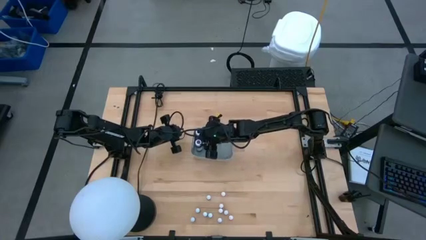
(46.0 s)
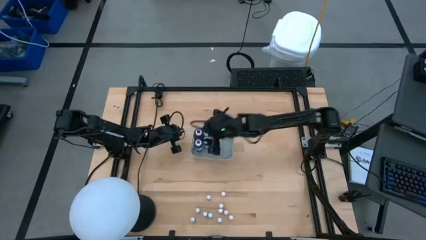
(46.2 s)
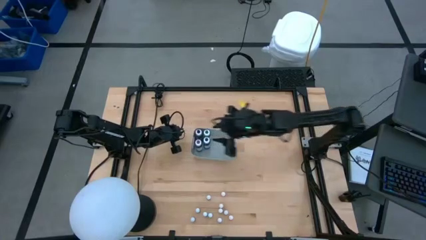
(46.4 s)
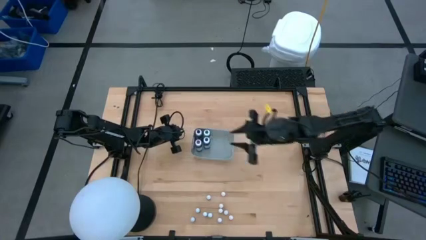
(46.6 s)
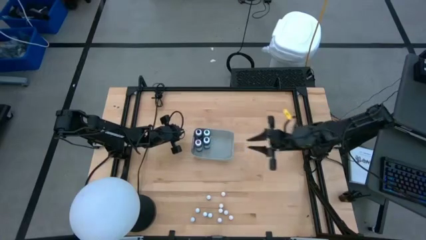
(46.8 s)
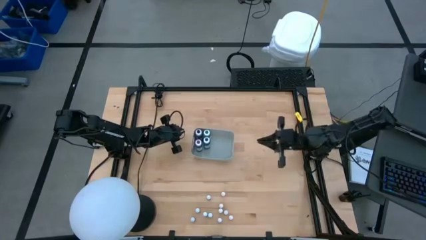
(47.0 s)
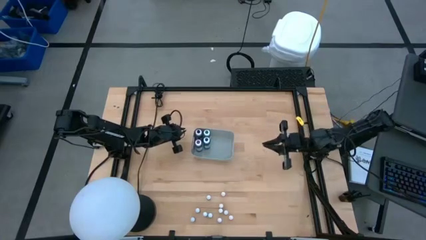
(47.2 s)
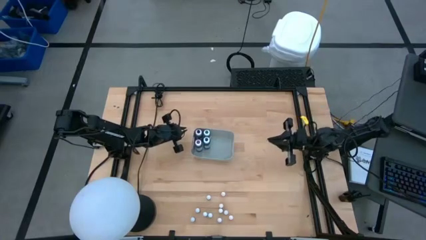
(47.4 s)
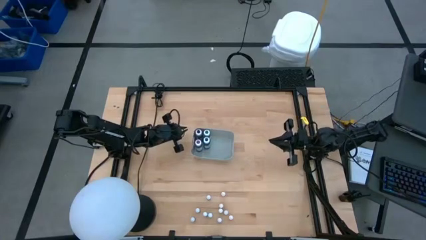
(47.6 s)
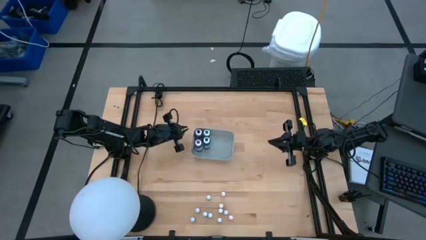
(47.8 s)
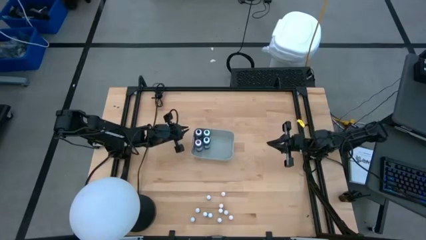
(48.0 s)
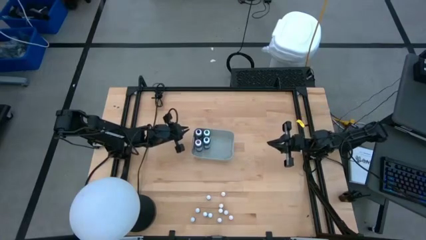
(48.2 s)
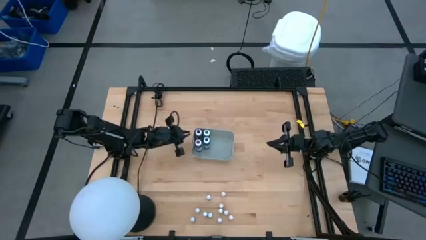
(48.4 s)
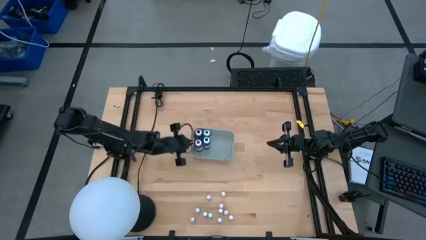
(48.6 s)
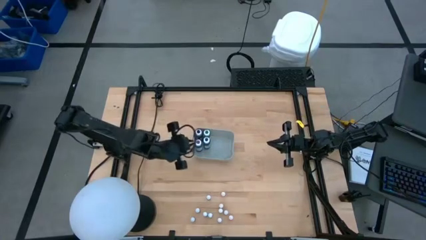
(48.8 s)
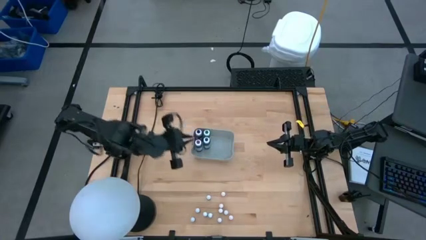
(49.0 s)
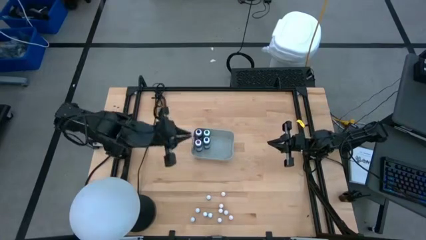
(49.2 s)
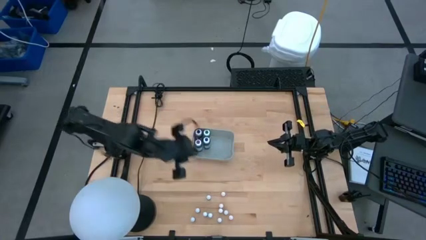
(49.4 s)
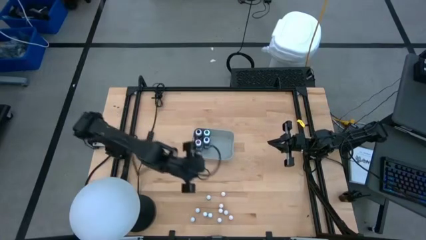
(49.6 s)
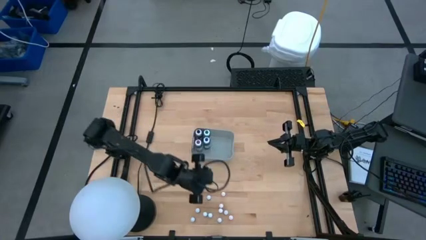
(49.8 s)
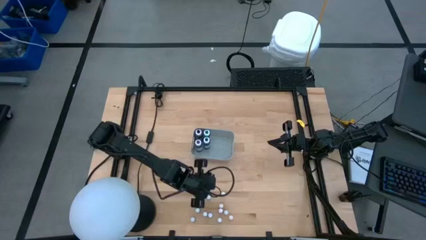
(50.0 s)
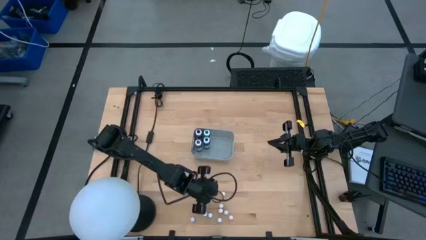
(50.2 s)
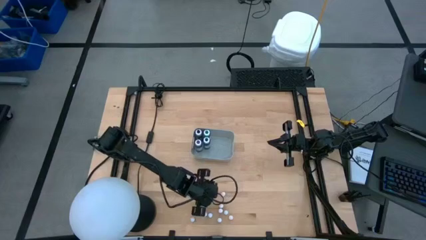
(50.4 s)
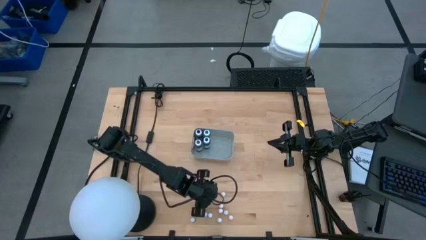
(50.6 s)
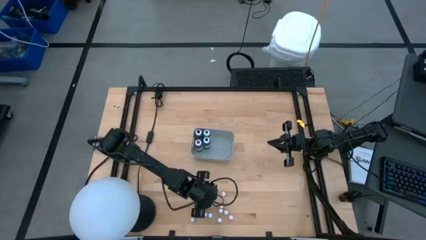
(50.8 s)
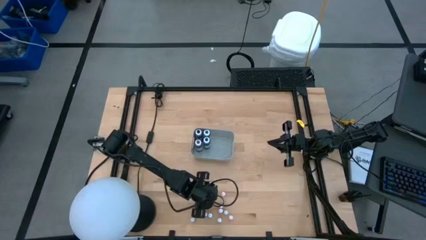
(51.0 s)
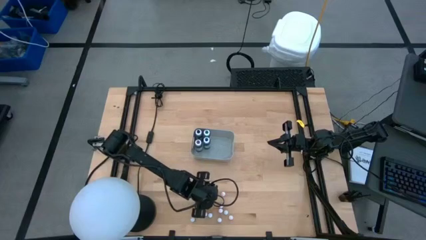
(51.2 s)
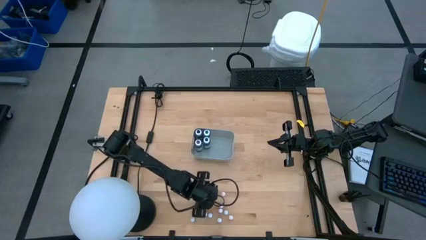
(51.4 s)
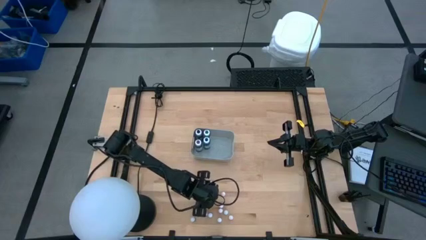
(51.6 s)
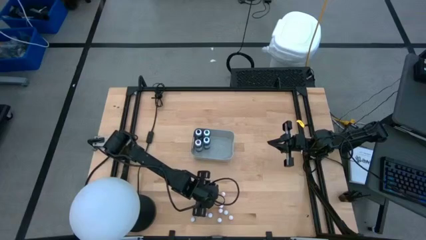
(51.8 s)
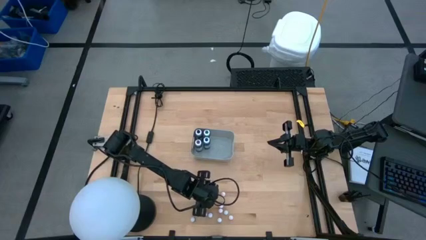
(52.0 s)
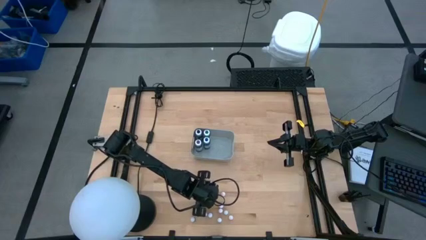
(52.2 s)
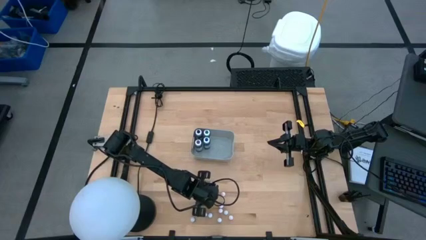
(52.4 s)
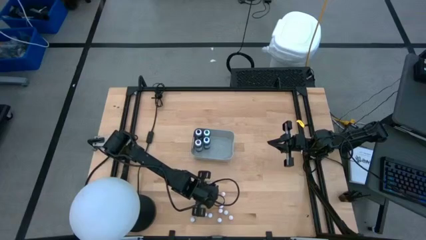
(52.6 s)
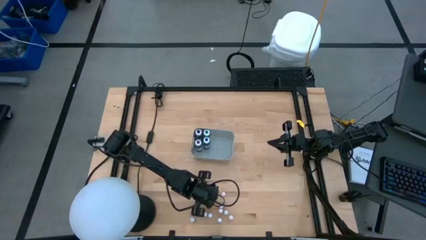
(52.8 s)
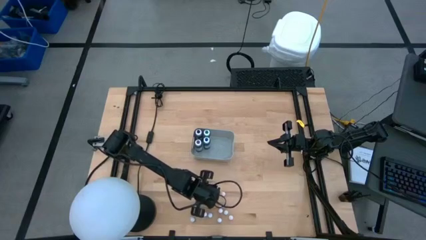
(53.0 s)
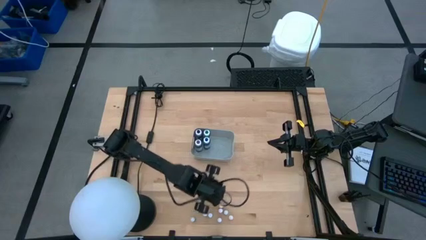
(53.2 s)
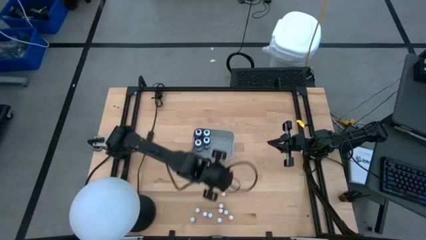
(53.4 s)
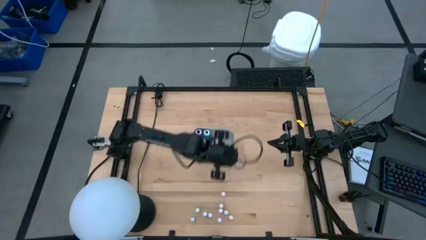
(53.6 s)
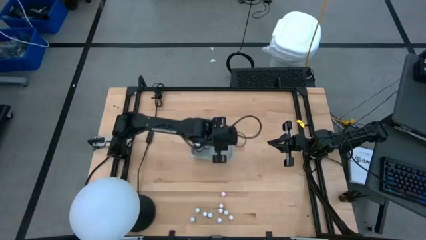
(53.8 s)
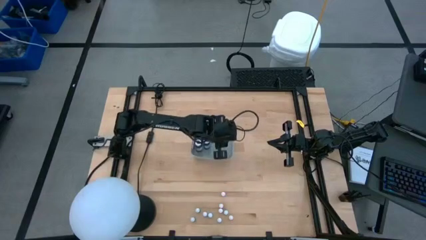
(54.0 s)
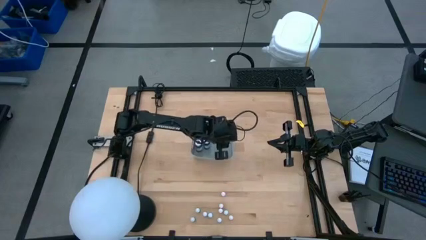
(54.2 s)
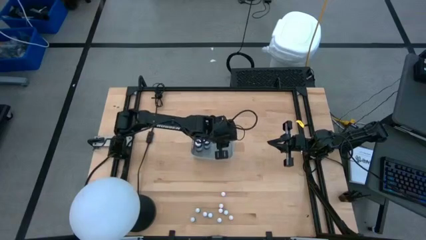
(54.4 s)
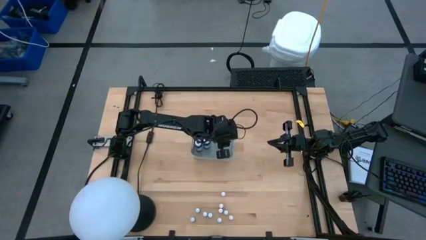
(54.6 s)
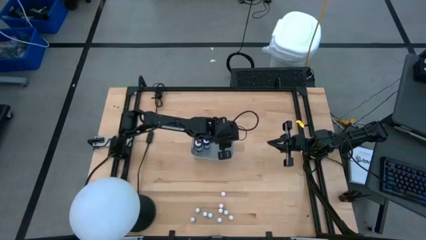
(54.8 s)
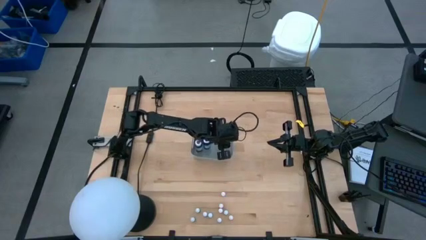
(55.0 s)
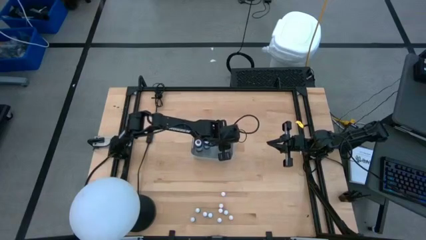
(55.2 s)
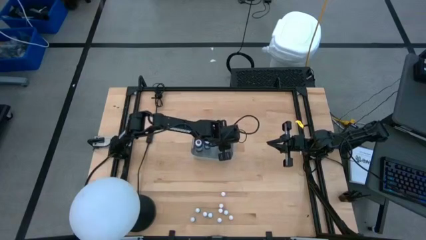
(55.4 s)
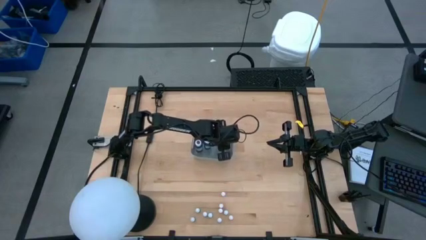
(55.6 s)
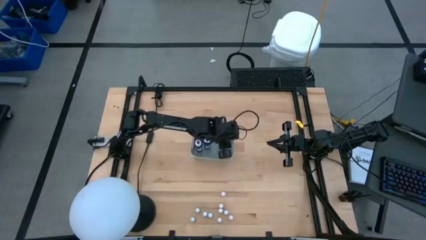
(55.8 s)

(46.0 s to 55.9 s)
Task: Pick & Place food coloring
Put the small violet food coloring bottle into the gray bin

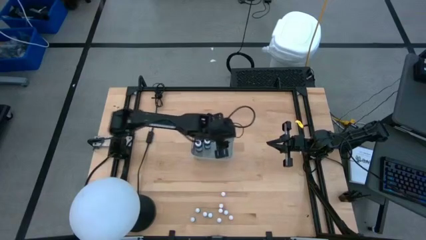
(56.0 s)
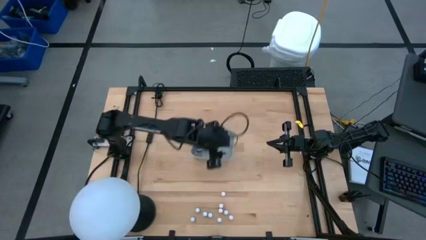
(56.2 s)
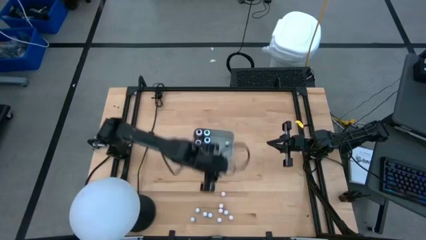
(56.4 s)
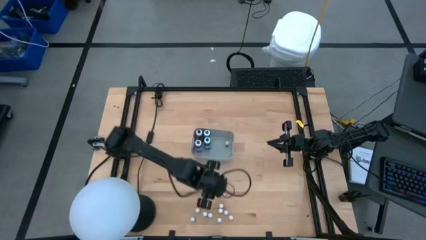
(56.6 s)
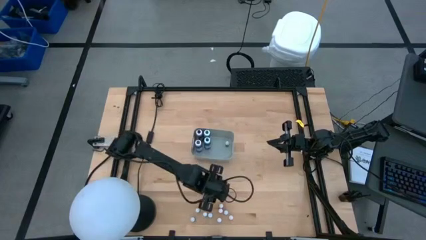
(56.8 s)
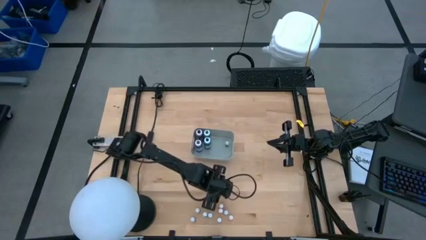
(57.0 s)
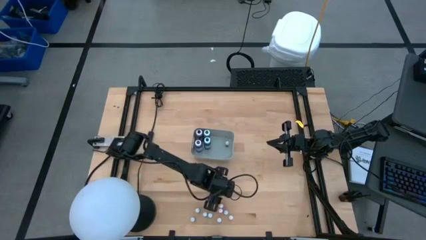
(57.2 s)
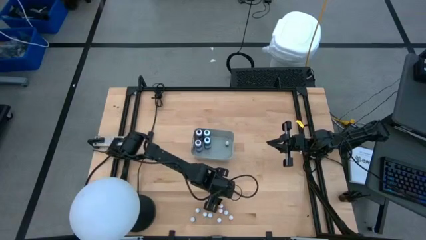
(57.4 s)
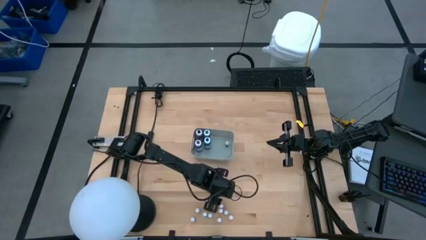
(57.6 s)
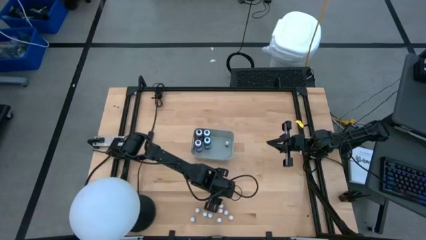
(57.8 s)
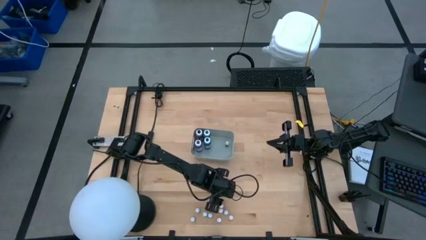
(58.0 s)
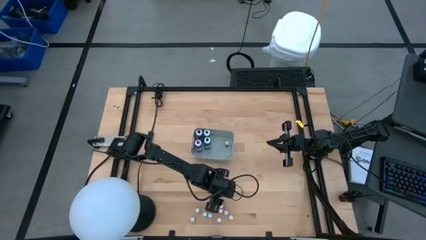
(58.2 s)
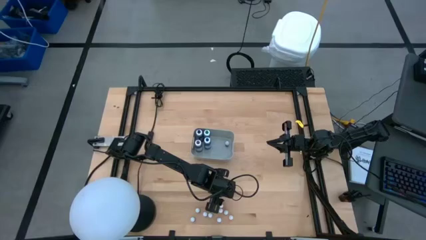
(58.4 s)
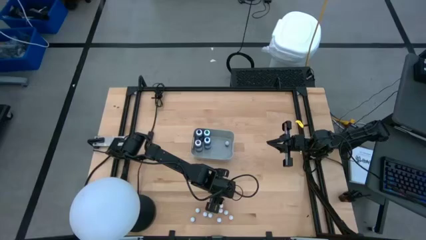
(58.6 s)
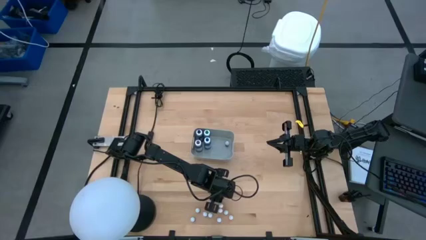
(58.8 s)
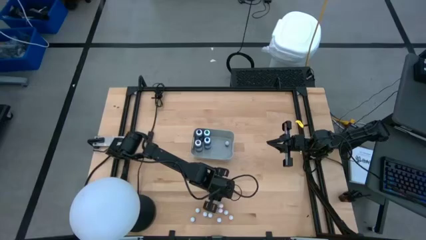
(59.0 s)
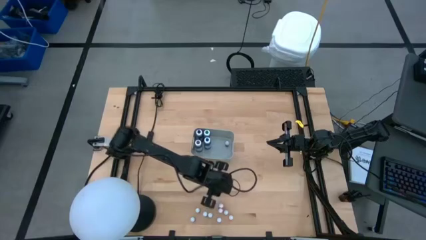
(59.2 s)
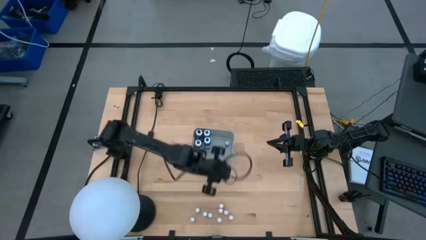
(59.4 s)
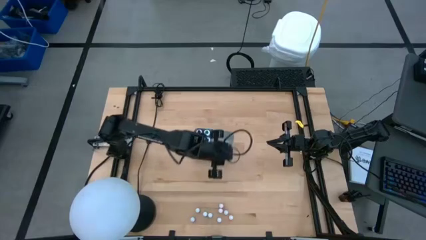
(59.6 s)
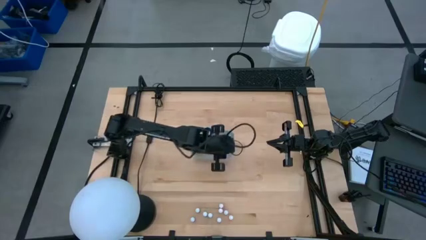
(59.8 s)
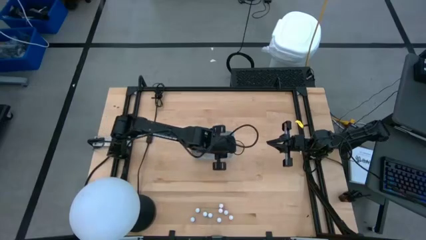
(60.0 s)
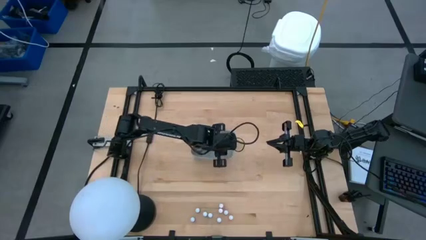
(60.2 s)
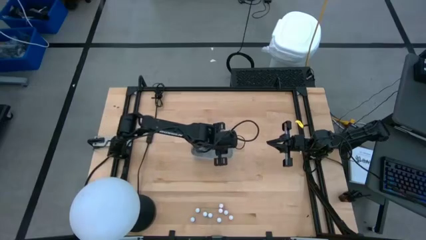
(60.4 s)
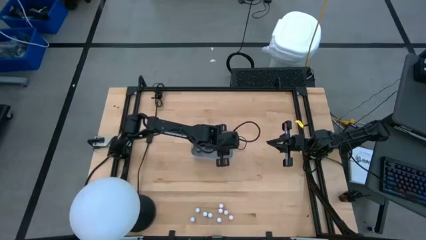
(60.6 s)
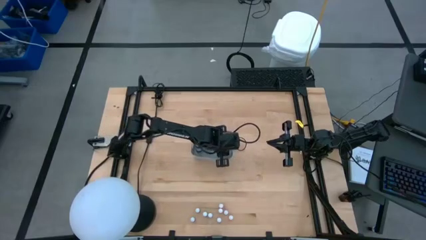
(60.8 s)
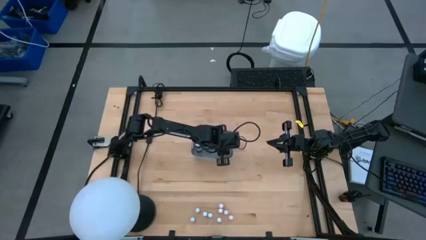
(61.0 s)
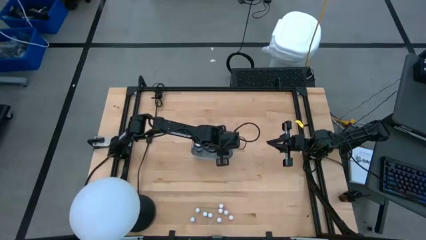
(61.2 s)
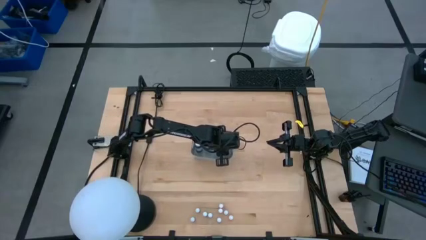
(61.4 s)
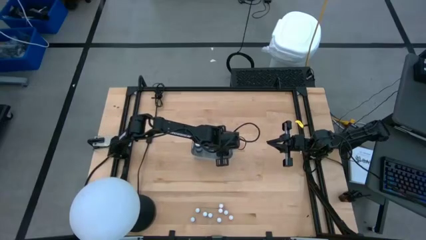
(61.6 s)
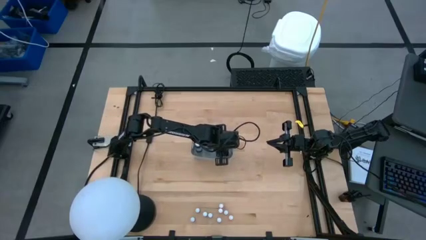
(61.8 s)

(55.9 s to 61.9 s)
Put the small orange food coloring bottle into the gray bin

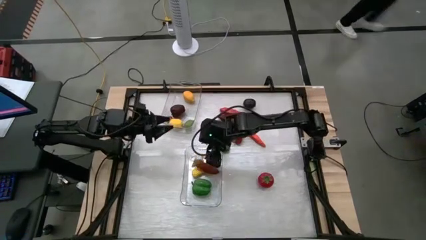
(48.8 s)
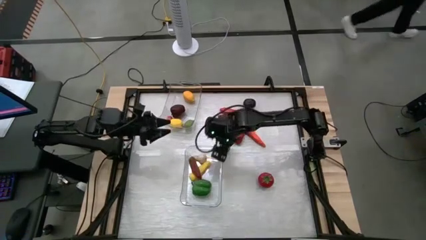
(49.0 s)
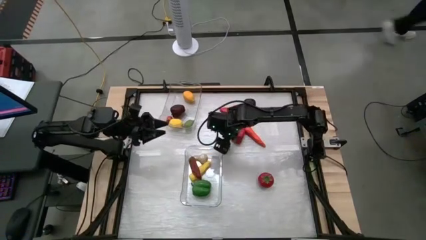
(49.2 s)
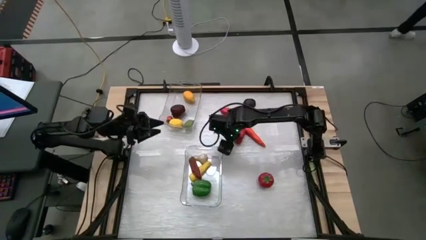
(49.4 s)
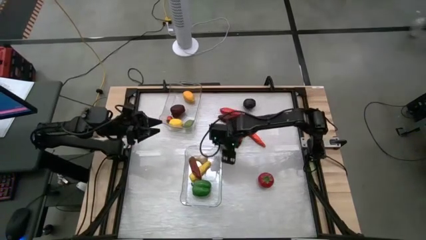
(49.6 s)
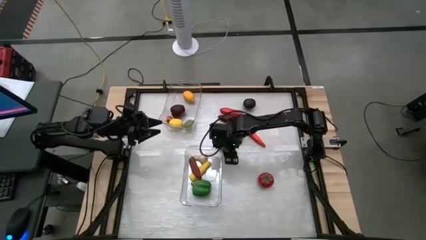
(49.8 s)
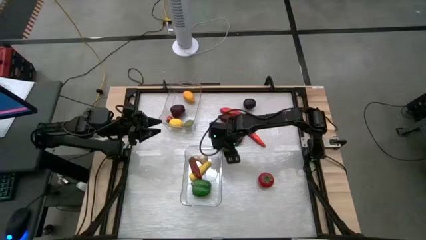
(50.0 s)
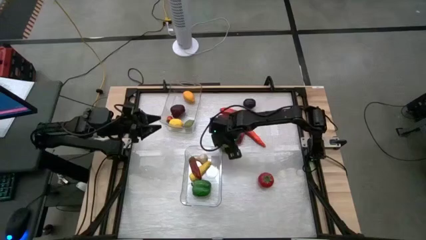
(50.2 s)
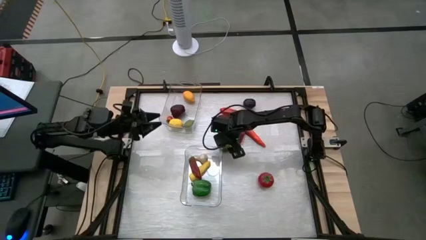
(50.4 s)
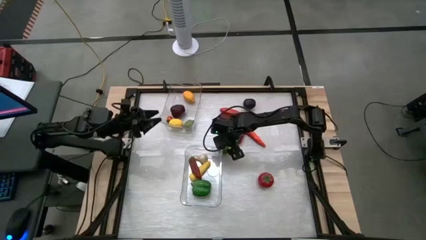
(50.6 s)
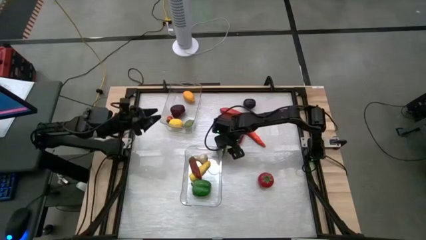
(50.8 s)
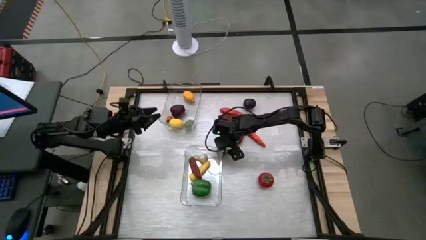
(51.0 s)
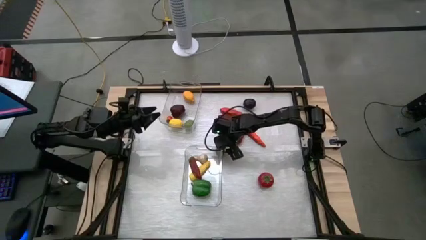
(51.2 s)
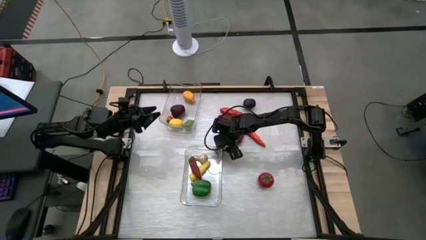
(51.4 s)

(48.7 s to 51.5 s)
Task: Sort produce into baskets
Put the green lime into the top transparent bin
